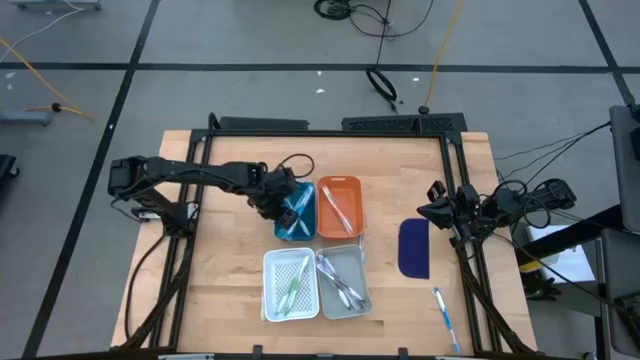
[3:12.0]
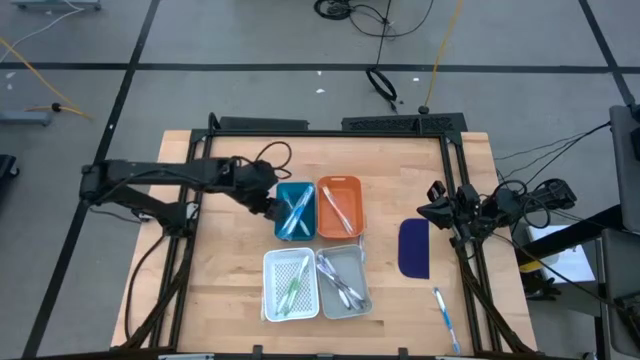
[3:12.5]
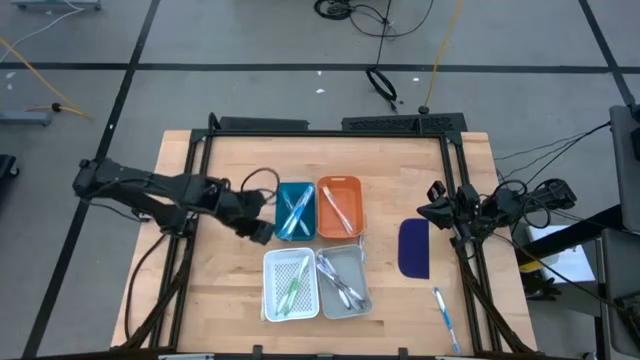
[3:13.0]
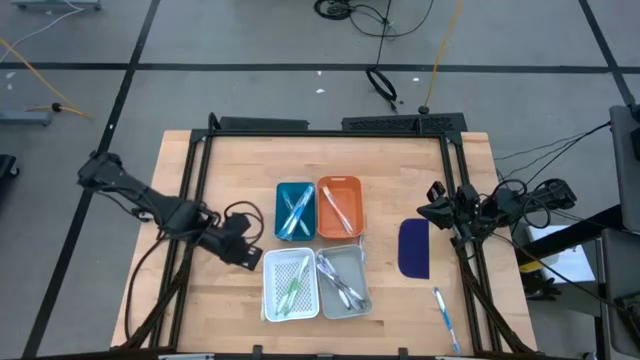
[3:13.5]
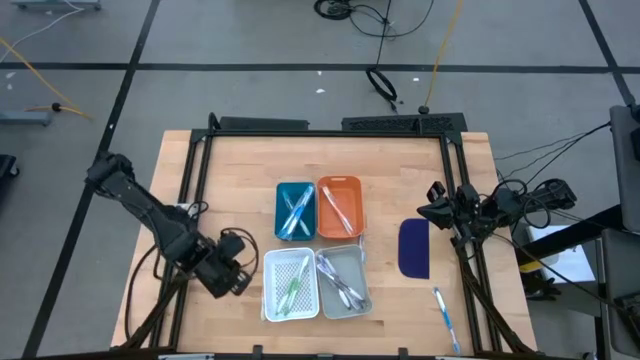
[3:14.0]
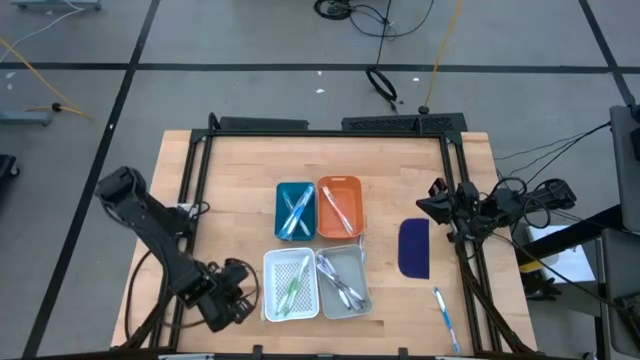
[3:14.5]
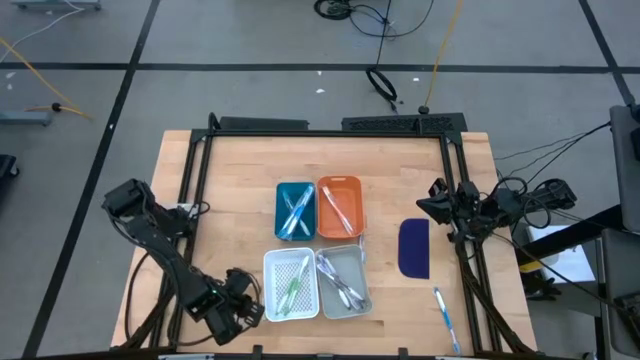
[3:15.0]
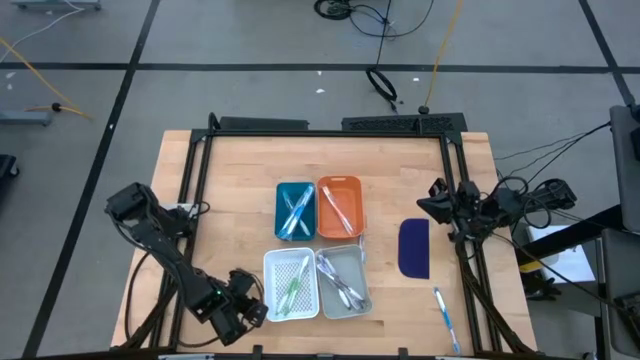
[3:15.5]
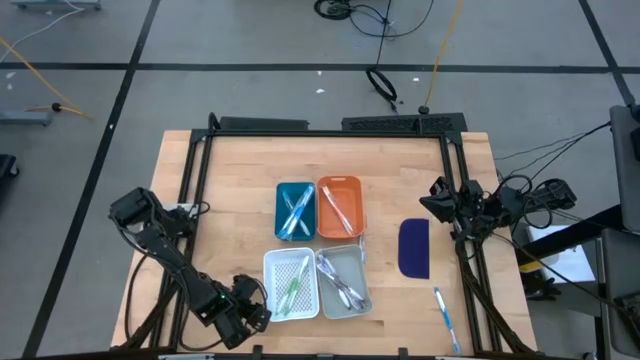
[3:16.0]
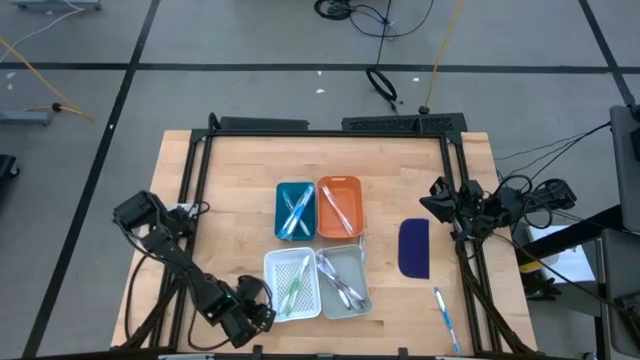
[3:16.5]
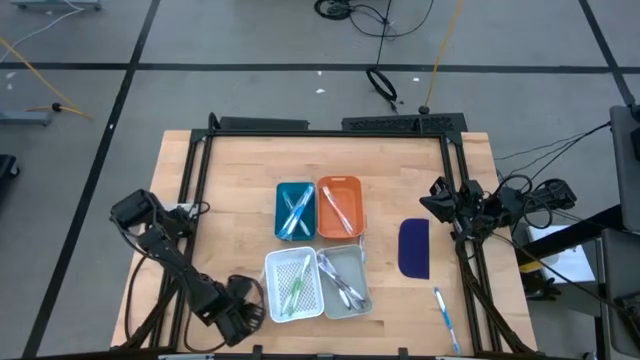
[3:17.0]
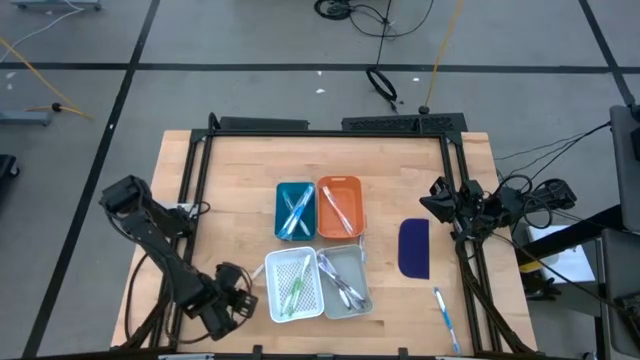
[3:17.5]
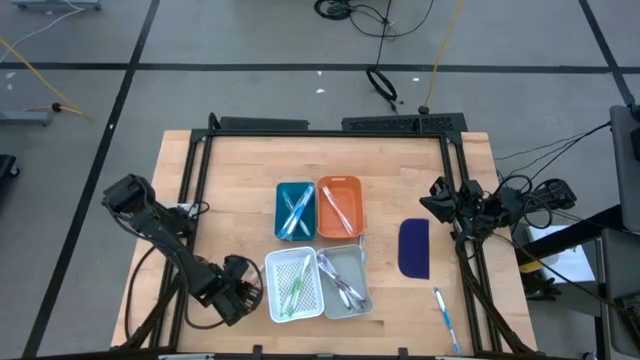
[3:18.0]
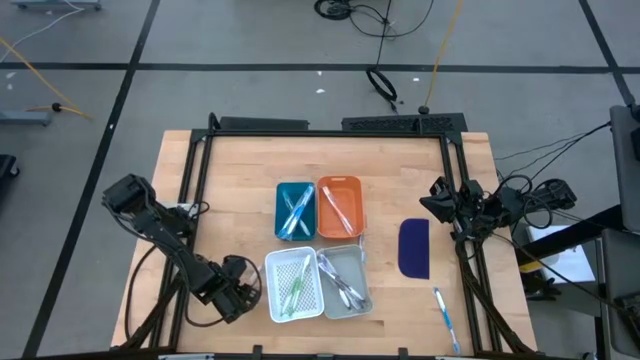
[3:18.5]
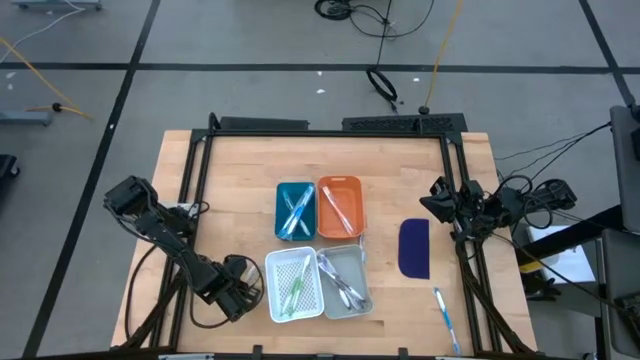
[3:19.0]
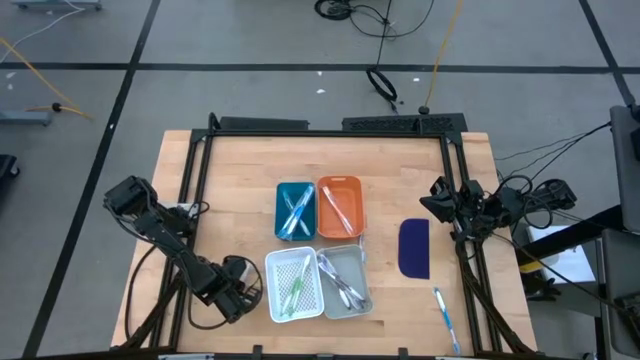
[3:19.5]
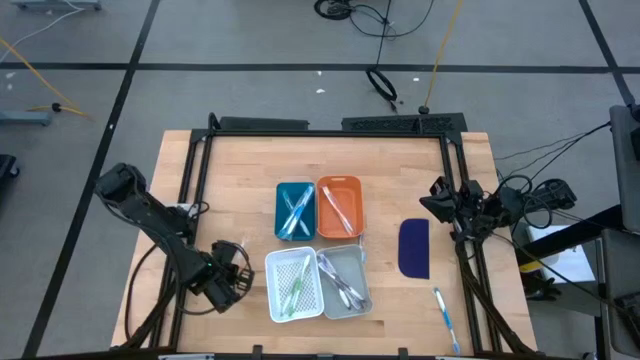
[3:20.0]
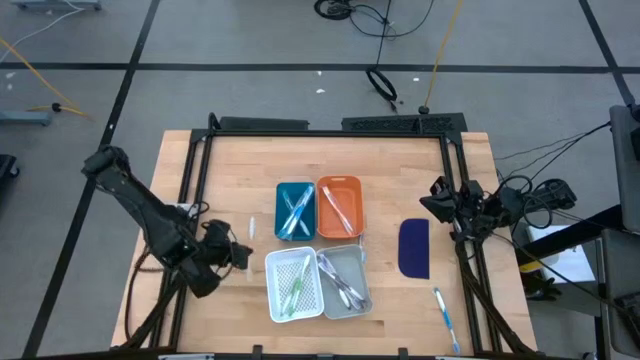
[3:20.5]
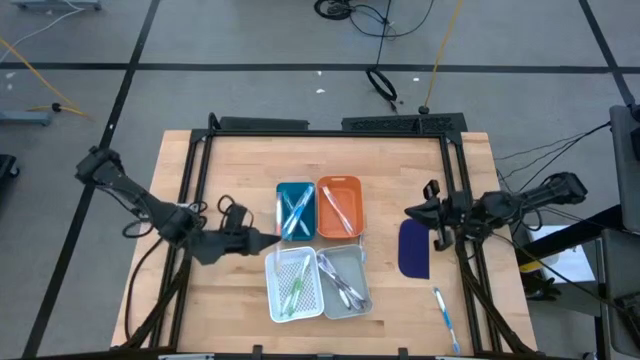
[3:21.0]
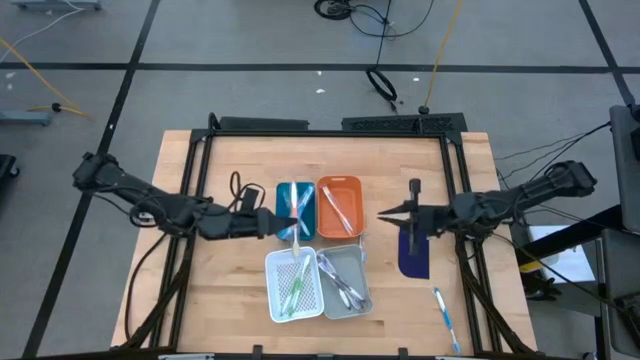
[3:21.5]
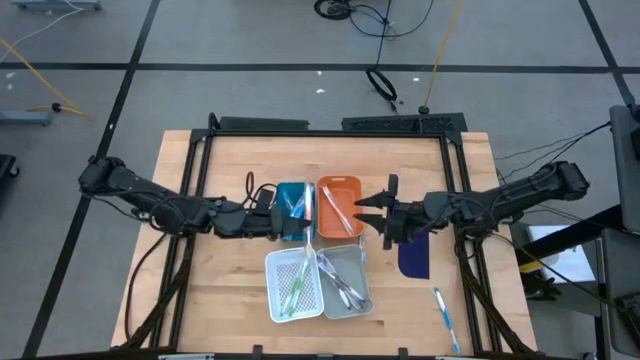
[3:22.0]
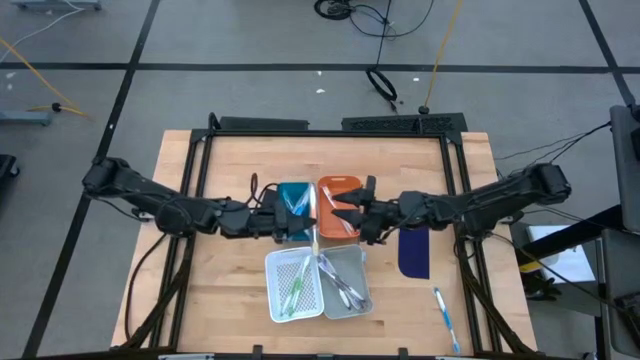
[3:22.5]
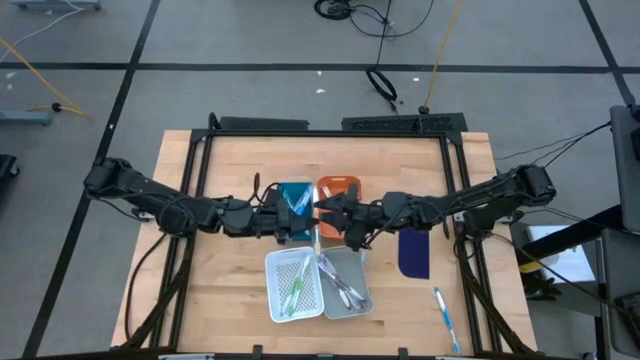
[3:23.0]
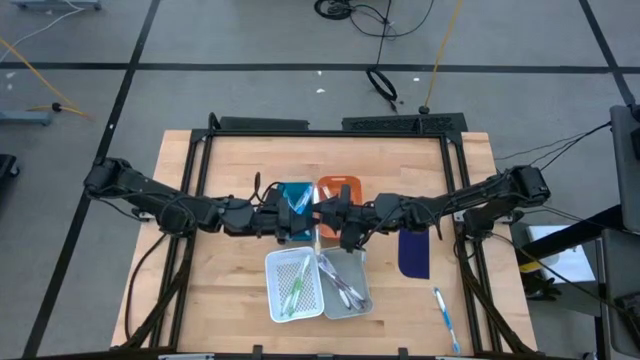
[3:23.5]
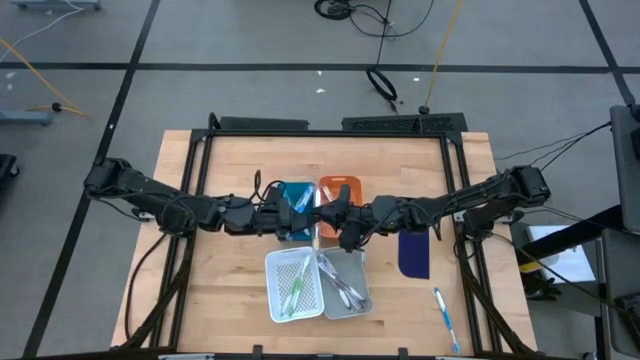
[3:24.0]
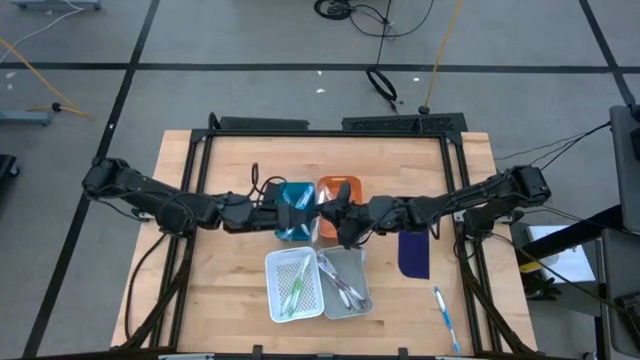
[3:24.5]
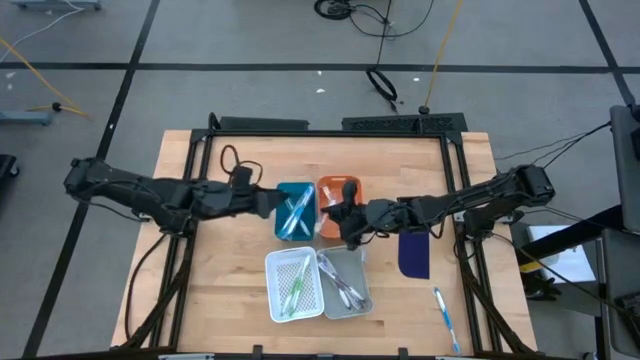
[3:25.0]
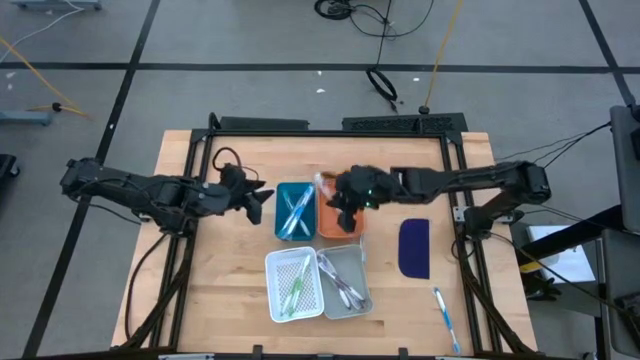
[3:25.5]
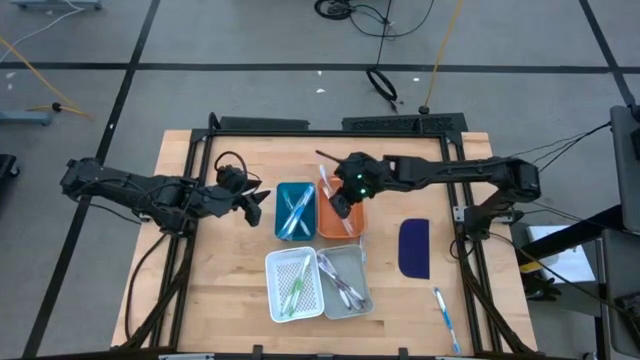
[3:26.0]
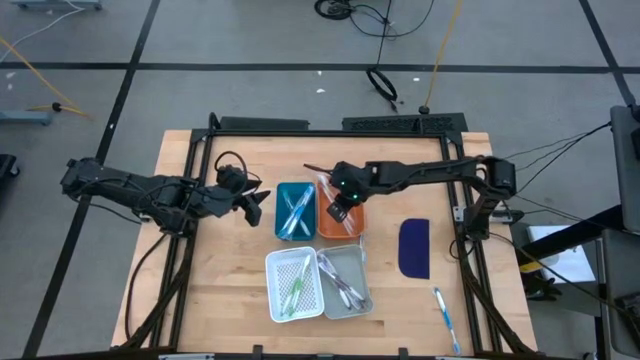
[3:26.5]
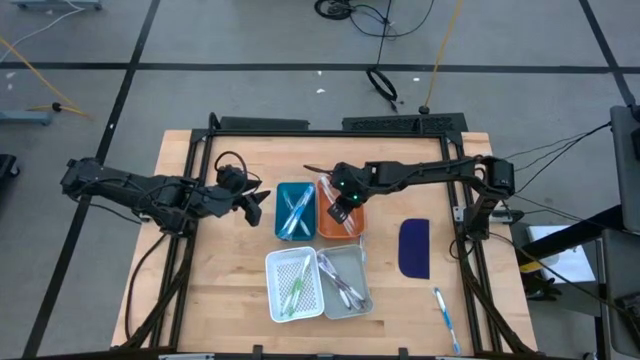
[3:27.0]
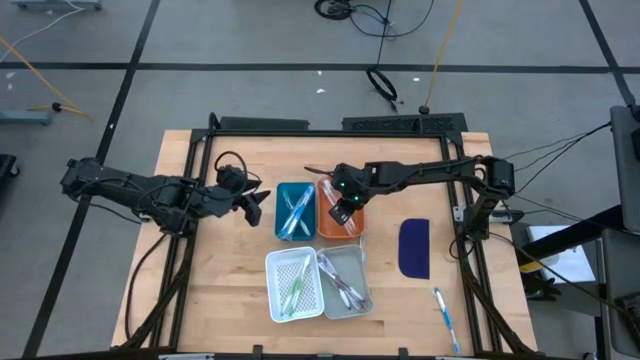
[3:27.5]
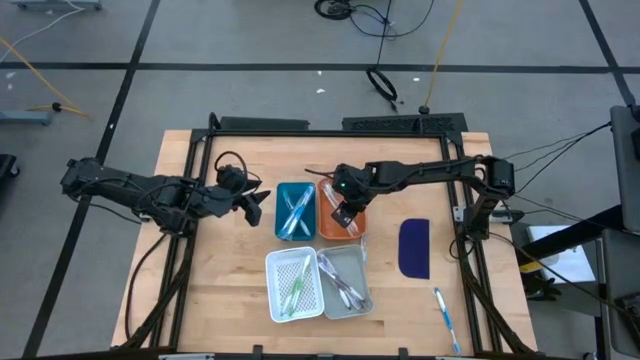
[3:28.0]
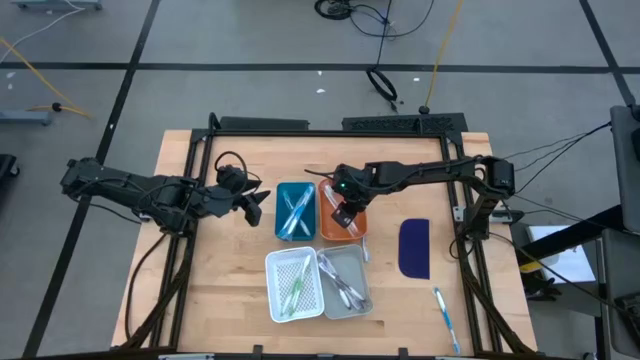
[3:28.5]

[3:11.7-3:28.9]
Task: Pick & Place Toothbrushes
Put the orange toothbrush into the orange bin

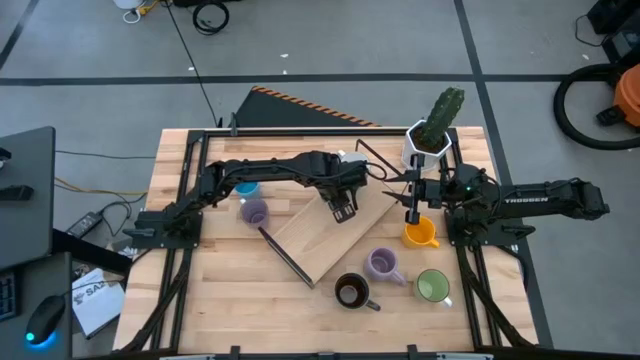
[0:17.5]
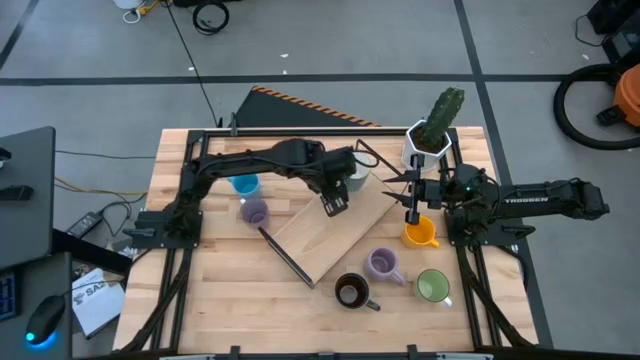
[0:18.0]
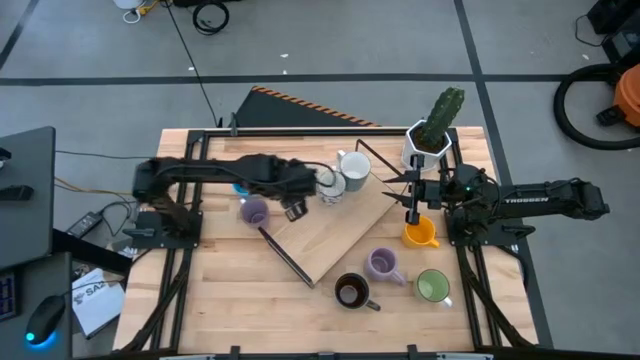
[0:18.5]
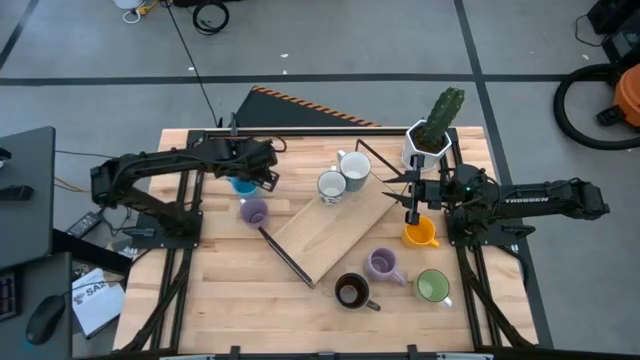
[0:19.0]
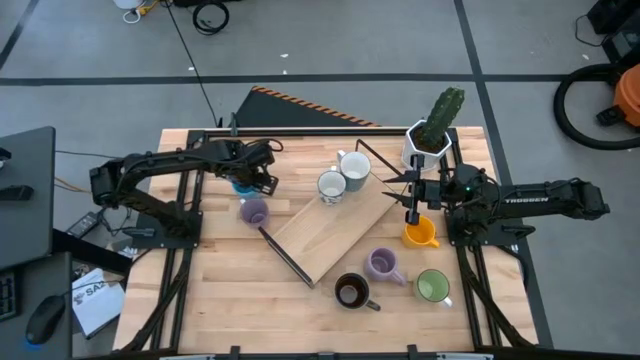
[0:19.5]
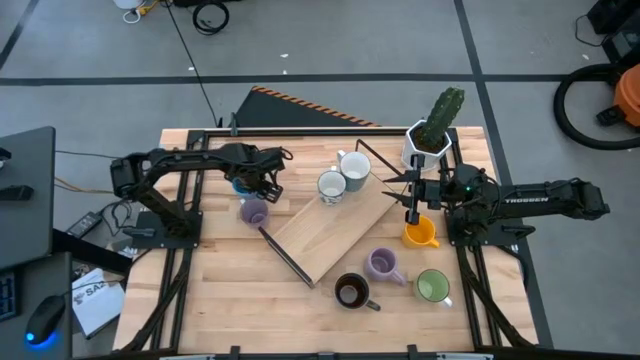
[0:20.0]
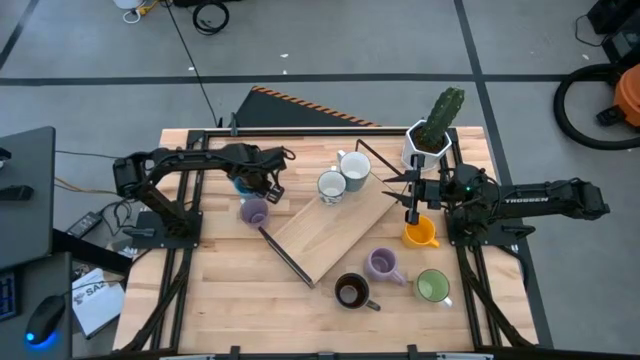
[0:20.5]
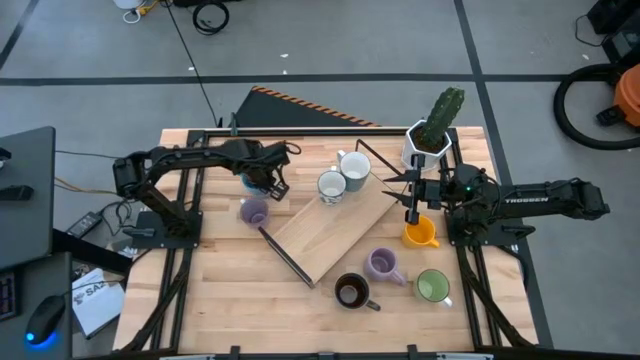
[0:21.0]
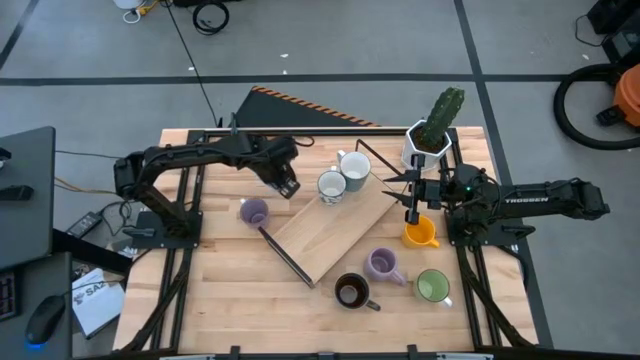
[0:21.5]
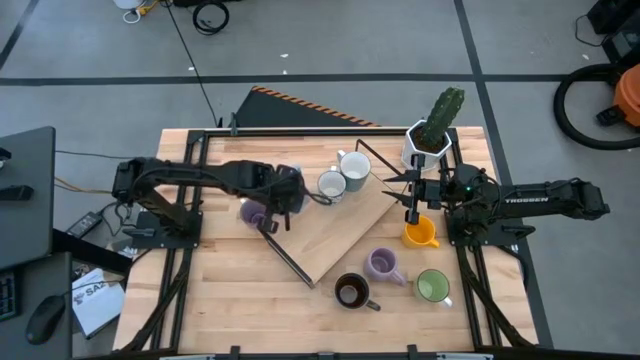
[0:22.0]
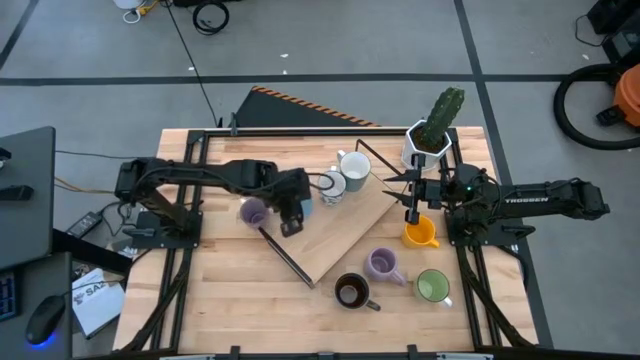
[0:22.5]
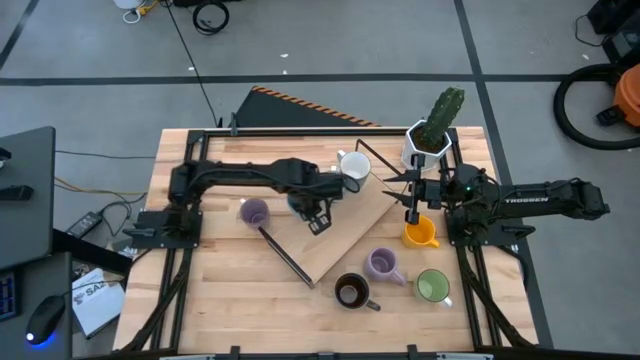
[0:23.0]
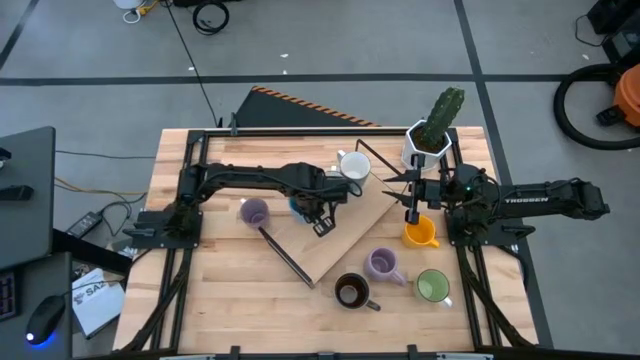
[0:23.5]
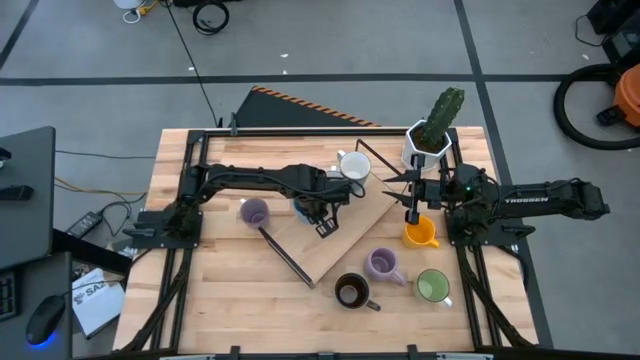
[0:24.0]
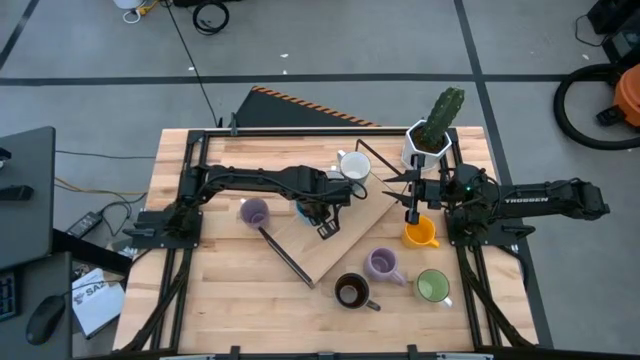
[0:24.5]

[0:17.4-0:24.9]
Task: Place coffee mugs
Put the light blue mug on the shelf
